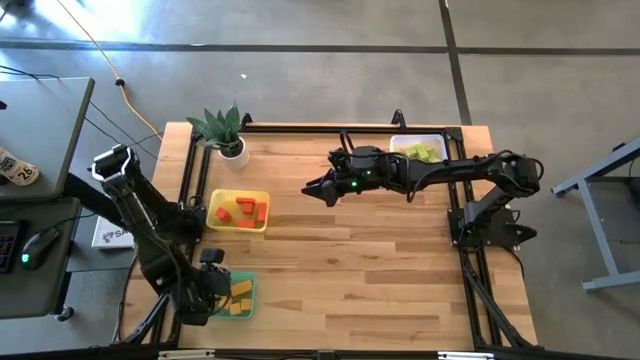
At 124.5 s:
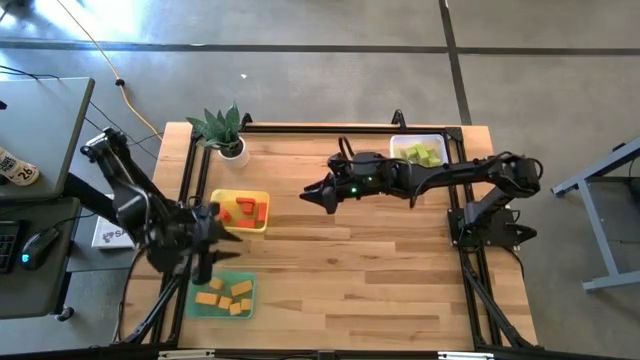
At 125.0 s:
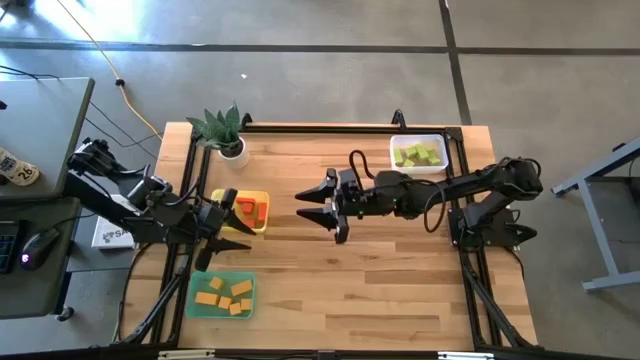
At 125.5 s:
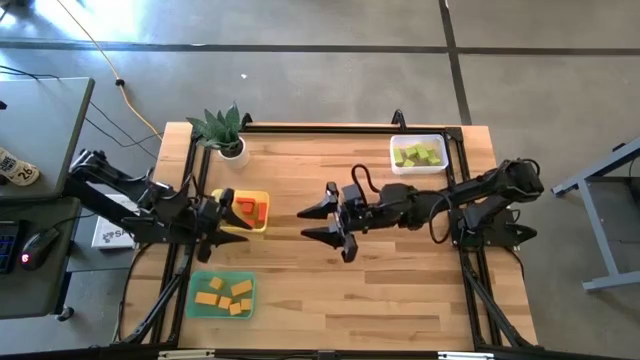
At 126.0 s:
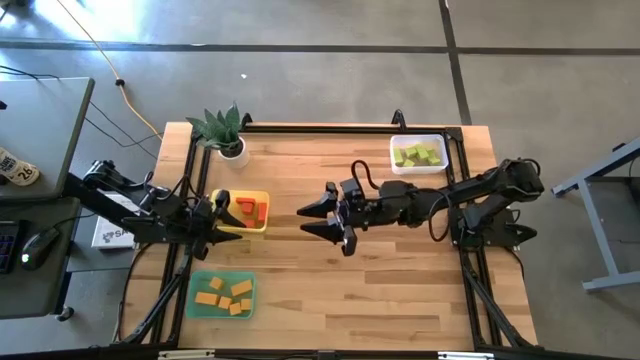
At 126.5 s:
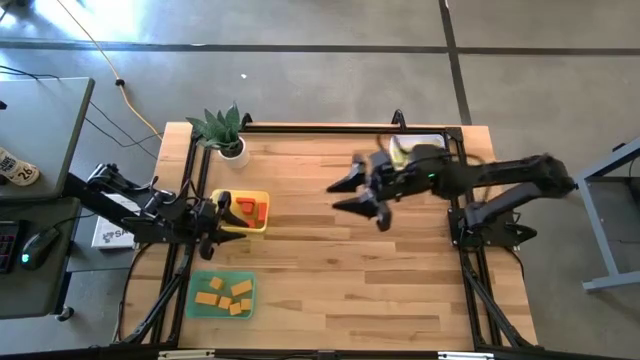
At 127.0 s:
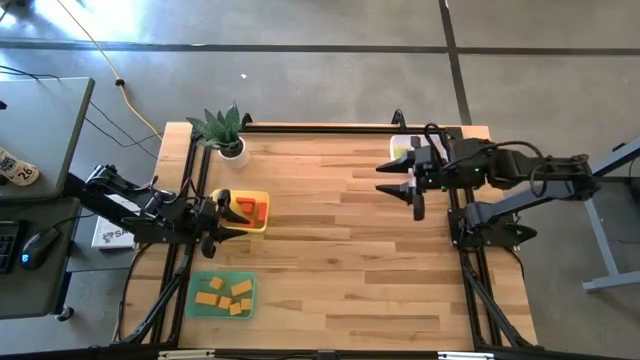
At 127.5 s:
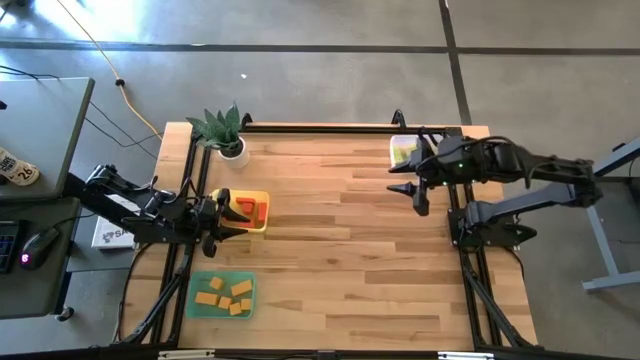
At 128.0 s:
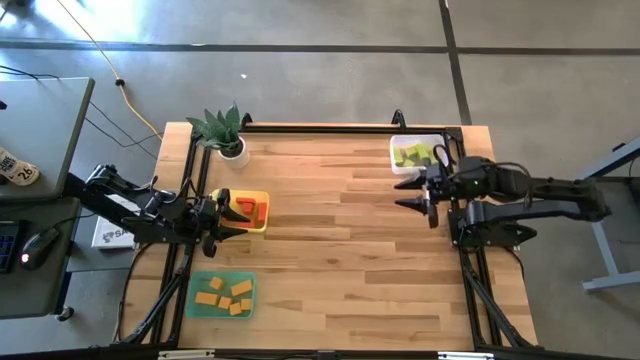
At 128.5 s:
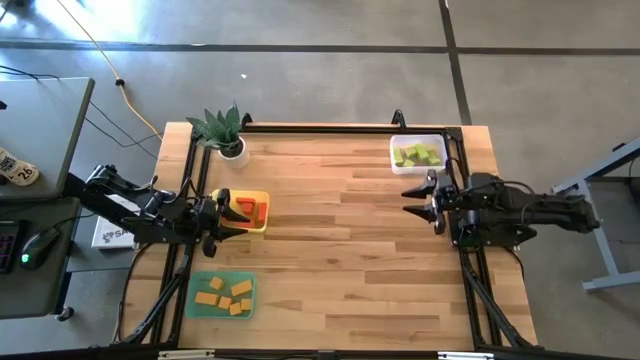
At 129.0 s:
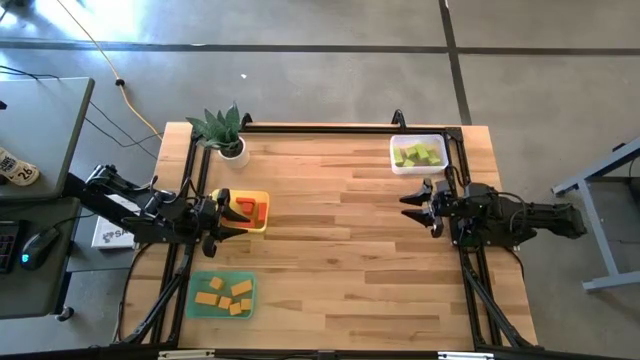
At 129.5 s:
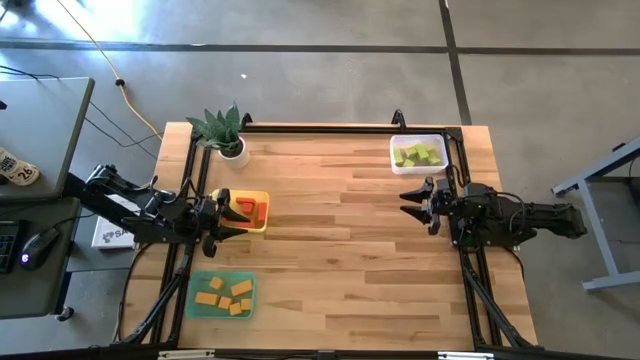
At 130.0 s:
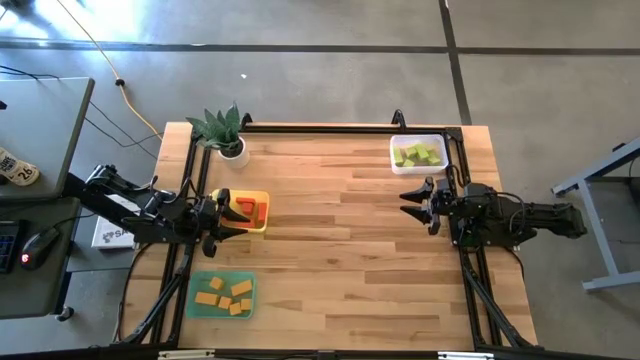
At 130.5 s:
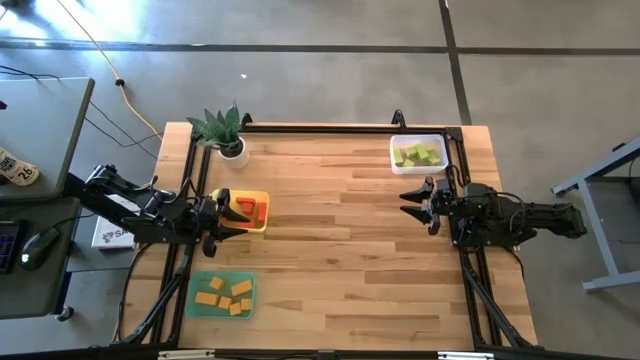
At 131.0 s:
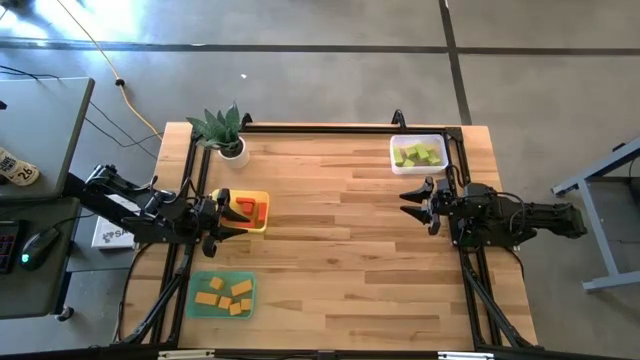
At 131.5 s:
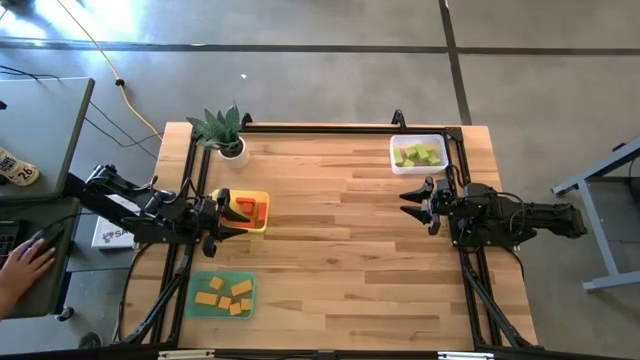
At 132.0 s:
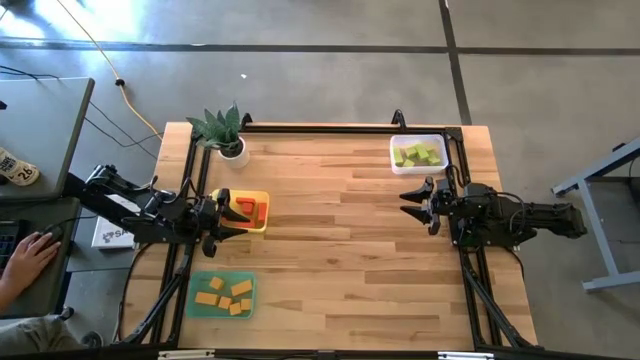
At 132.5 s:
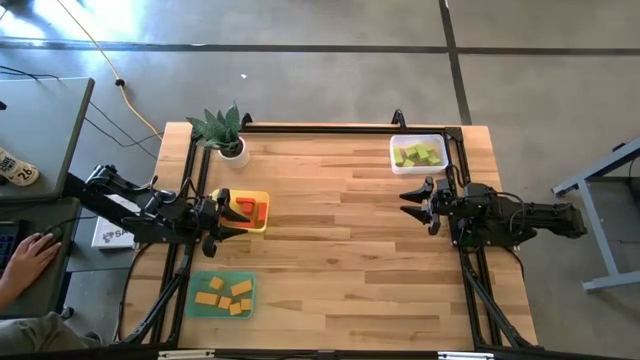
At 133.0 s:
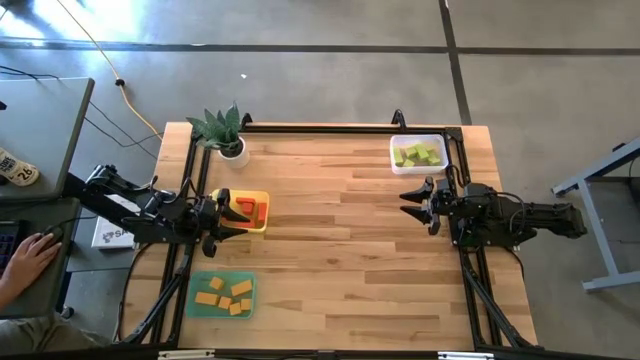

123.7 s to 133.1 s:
Task: Sort & place blocks by color
Return to Home Position

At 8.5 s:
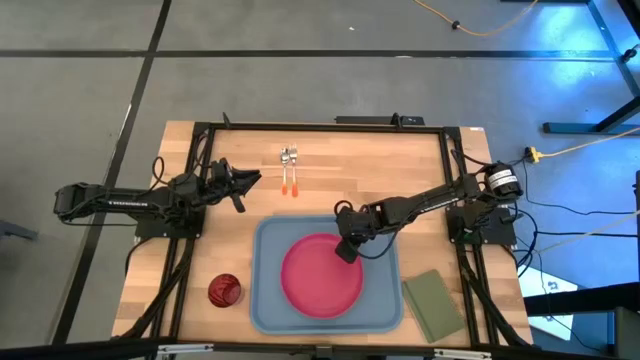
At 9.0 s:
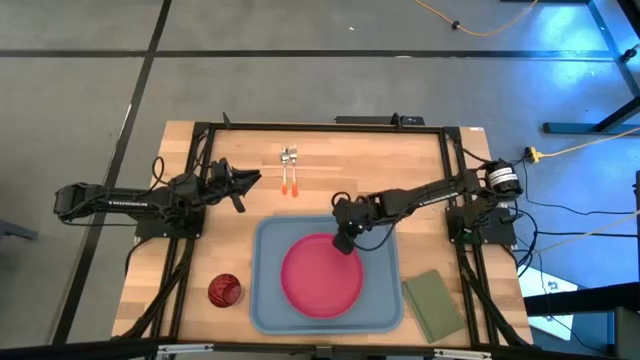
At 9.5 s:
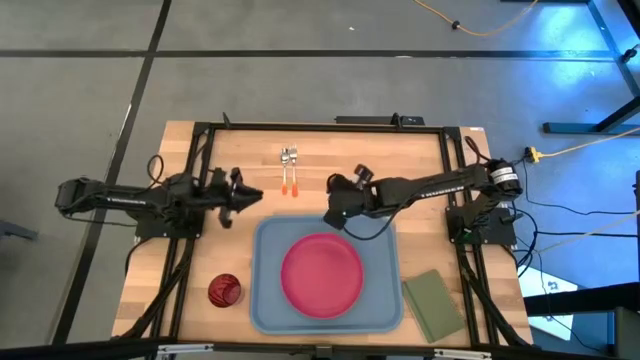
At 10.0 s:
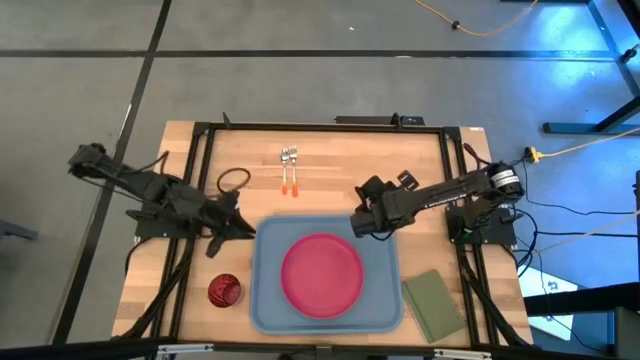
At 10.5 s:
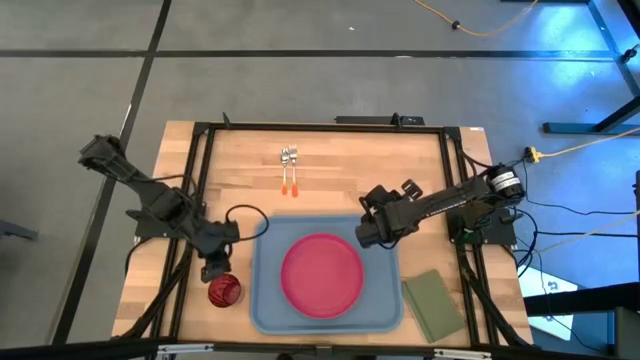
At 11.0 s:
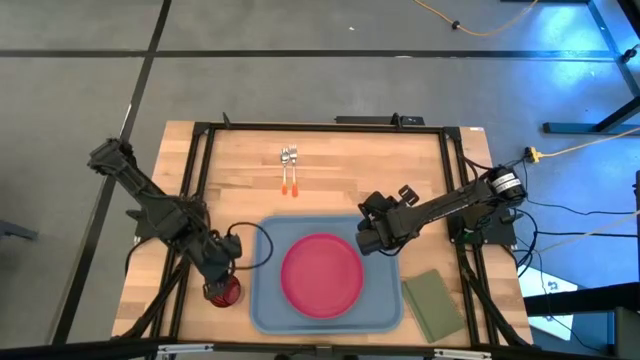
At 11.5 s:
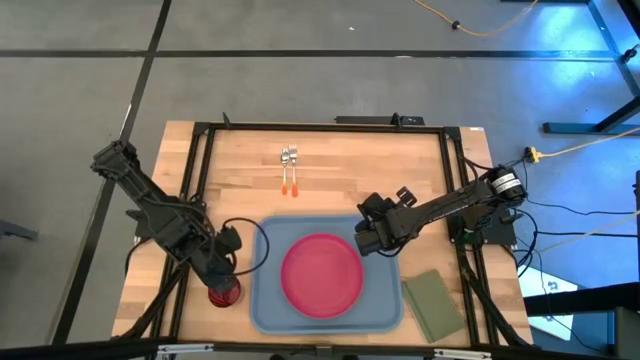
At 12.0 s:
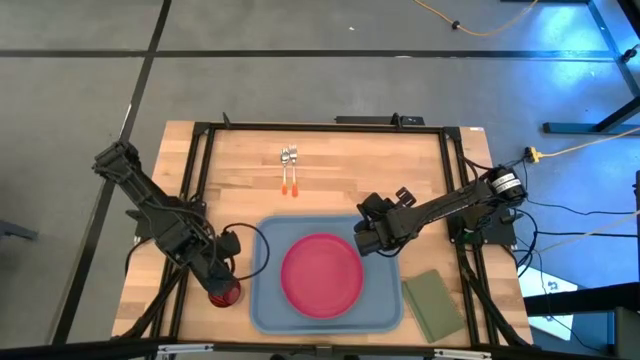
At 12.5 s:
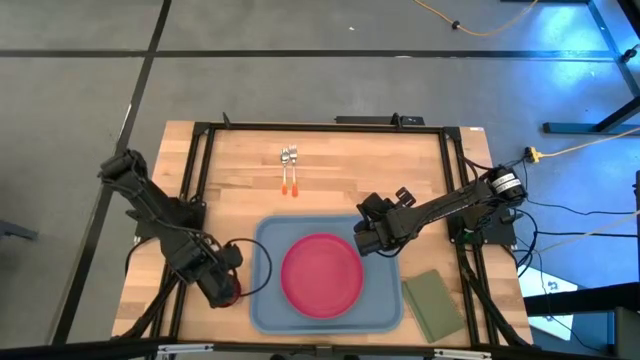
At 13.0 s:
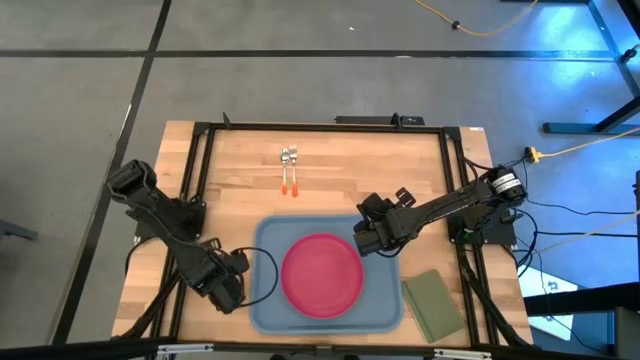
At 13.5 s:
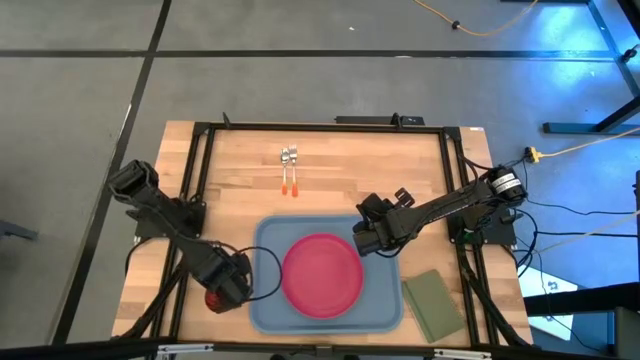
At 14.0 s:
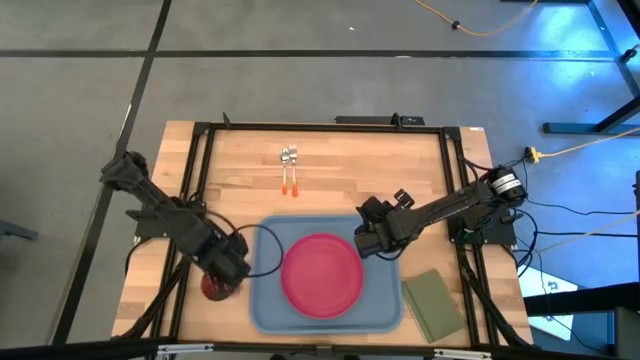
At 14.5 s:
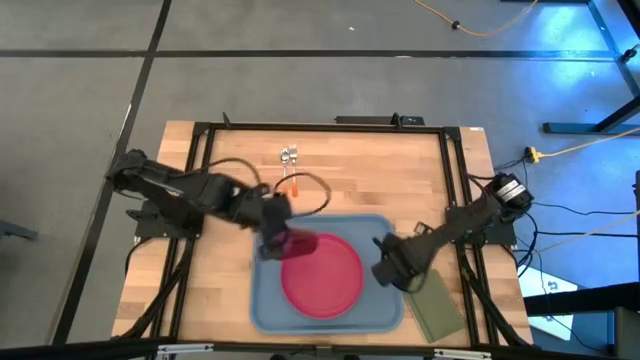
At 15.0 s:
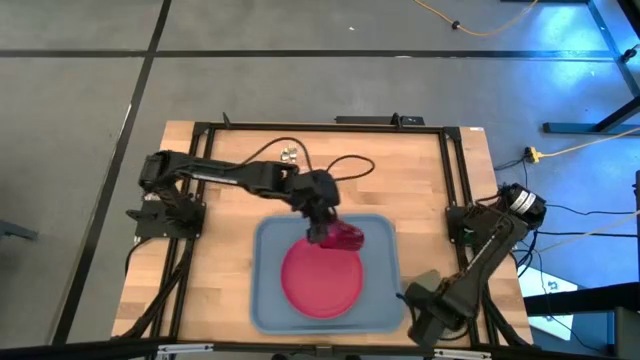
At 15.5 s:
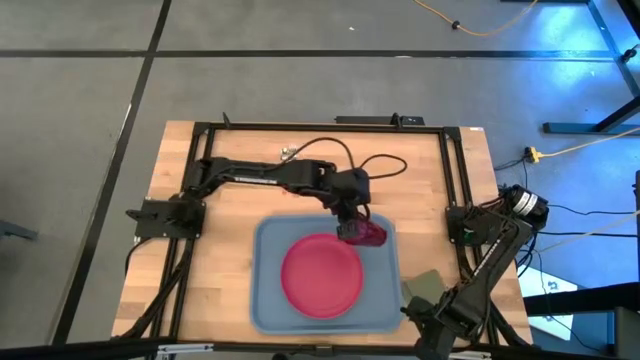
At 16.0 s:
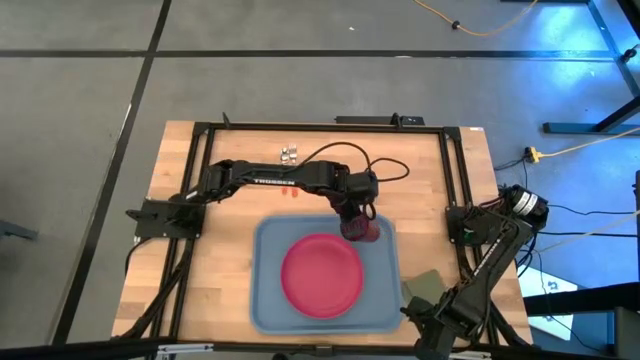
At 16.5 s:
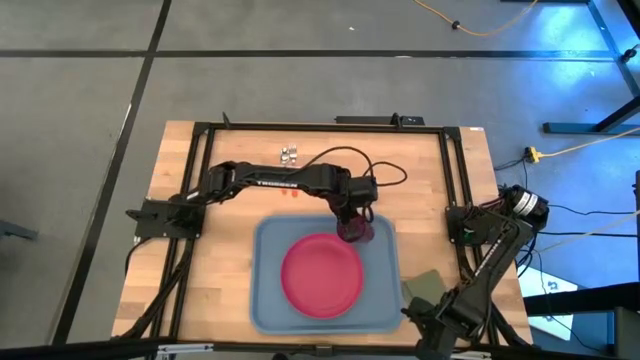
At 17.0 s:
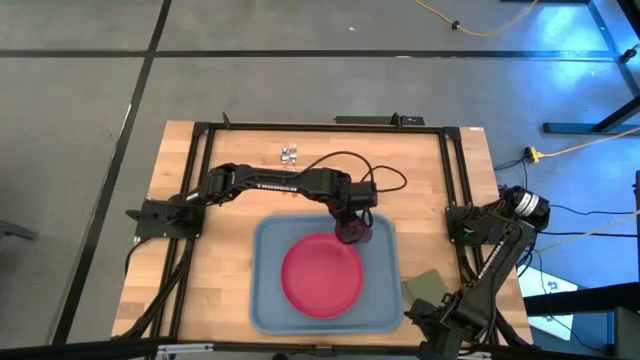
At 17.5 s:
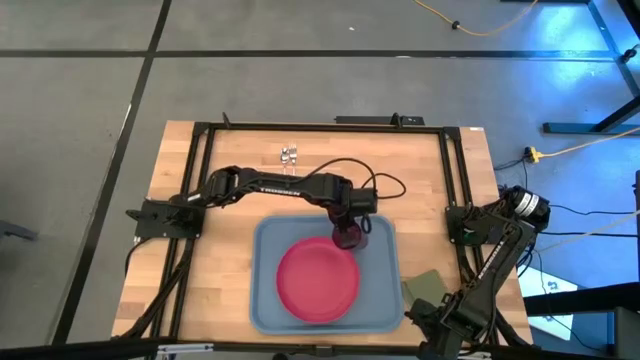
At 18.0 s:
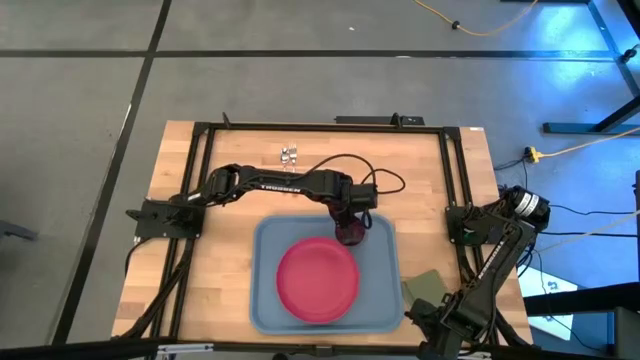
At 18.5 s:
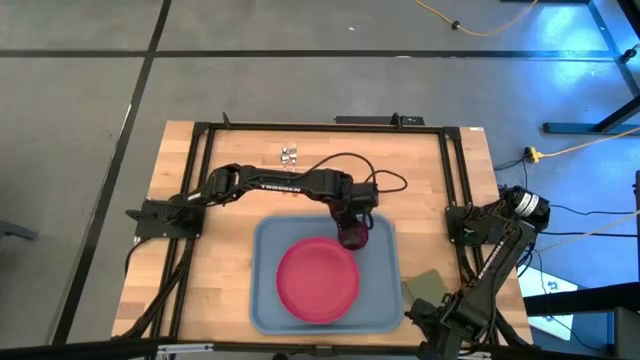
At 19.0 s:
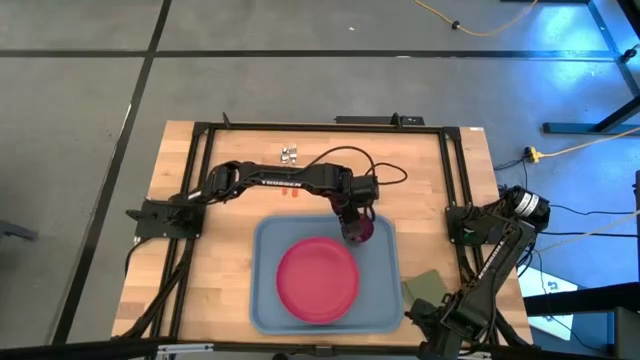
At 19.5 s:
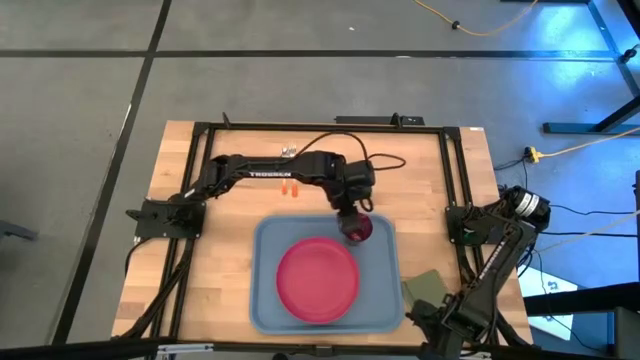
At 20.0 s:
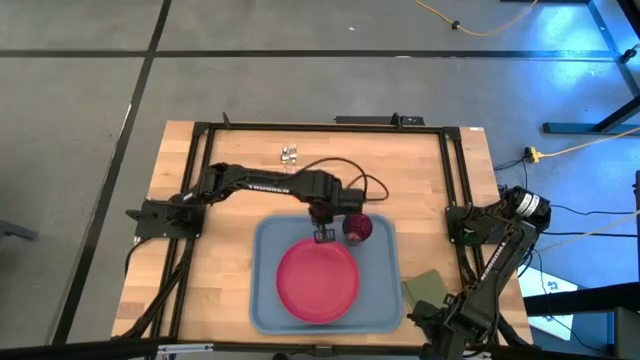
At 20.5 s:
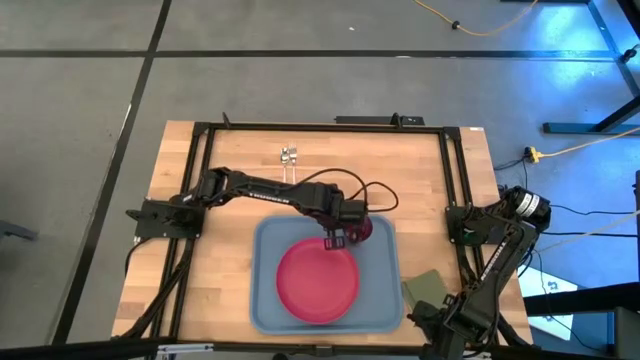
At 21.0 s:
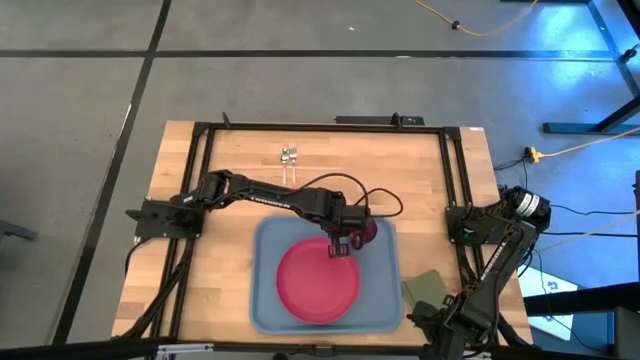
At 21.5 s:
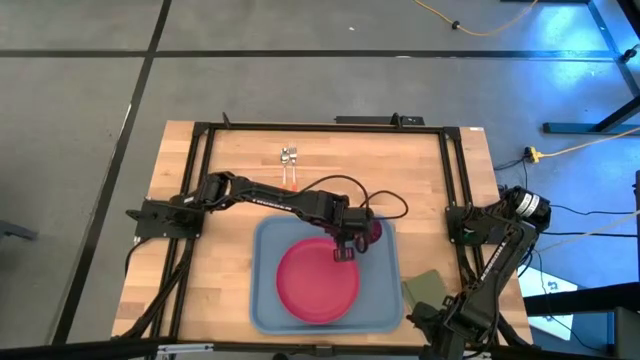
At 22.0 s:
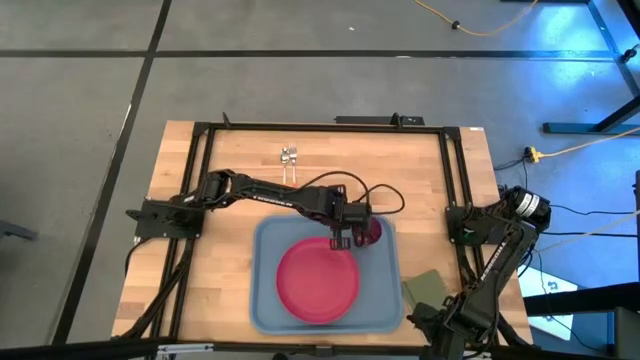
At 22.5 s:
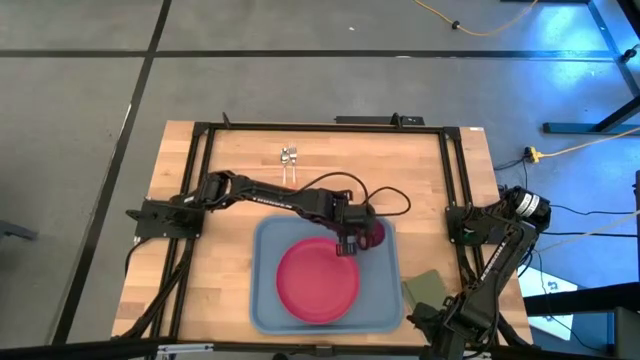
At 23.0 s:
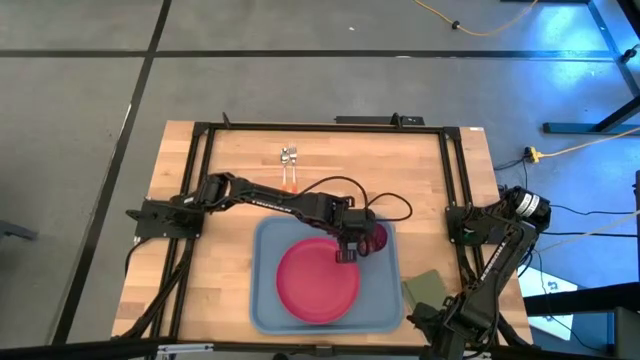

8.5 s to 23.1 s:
Task: Pick and place plate/cup/fork/spoon on tray
Put the red cup on the blue tray to the top right of the pink plate
